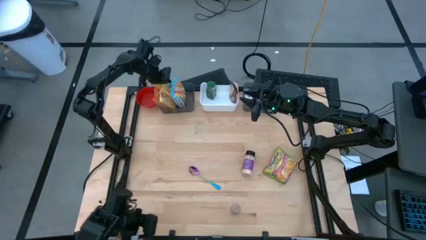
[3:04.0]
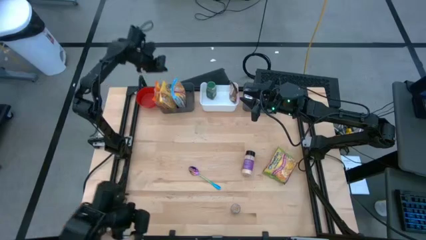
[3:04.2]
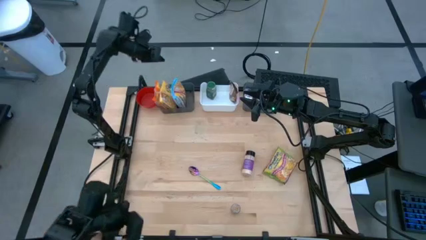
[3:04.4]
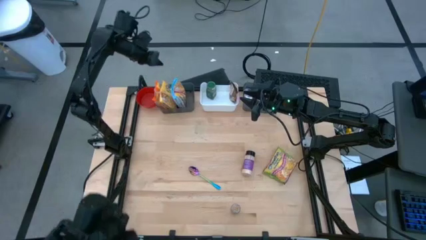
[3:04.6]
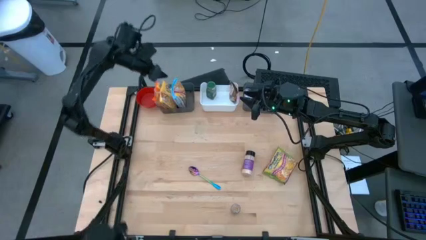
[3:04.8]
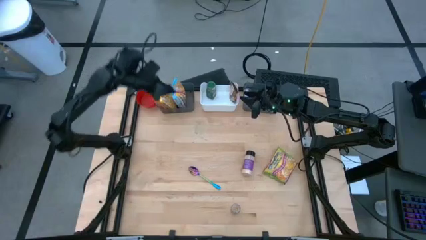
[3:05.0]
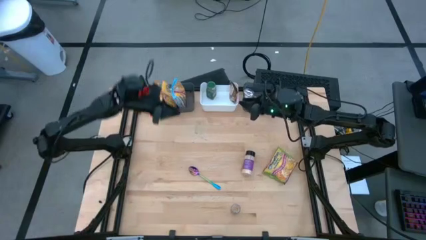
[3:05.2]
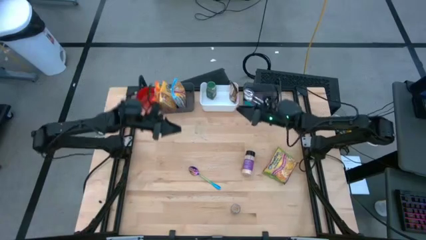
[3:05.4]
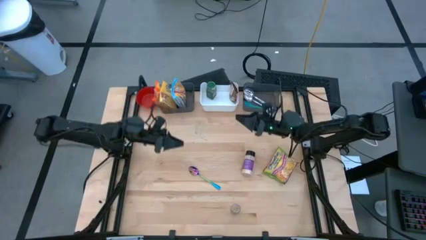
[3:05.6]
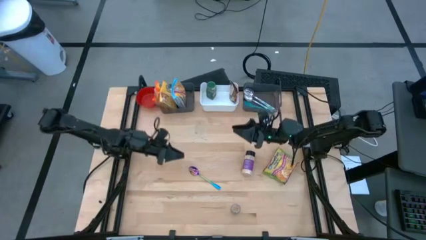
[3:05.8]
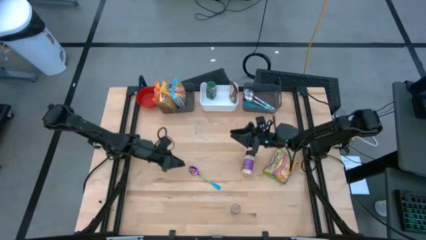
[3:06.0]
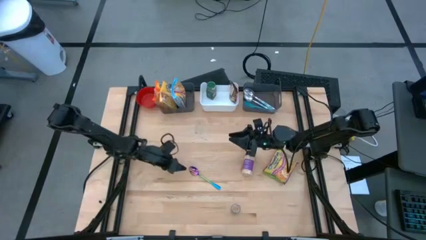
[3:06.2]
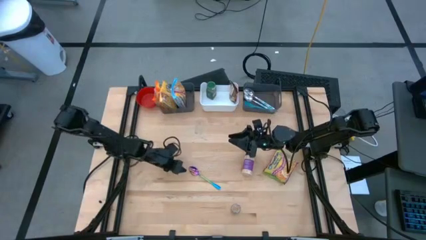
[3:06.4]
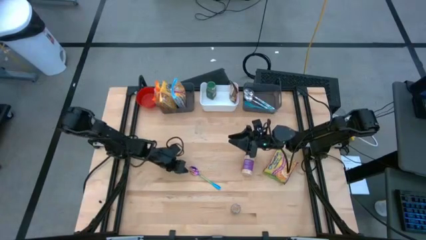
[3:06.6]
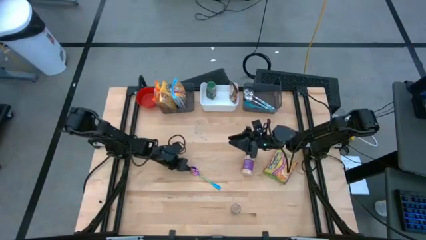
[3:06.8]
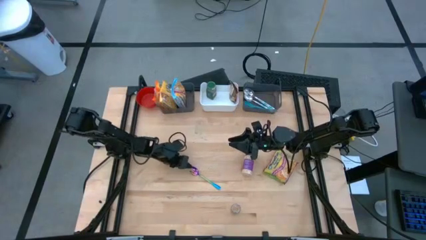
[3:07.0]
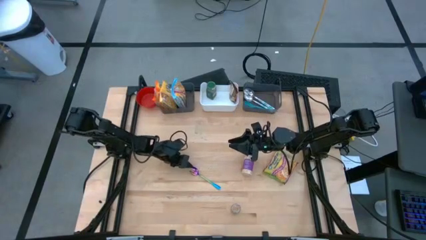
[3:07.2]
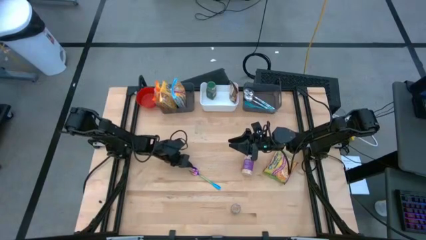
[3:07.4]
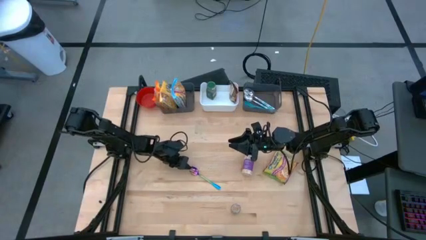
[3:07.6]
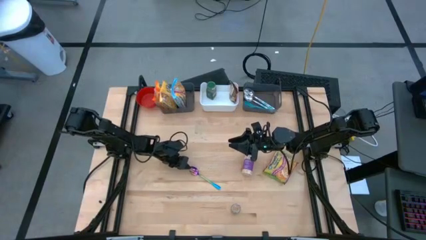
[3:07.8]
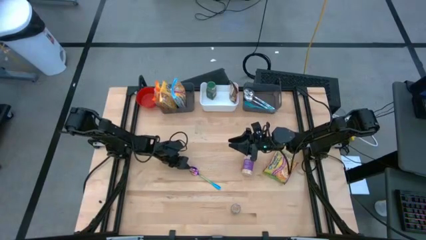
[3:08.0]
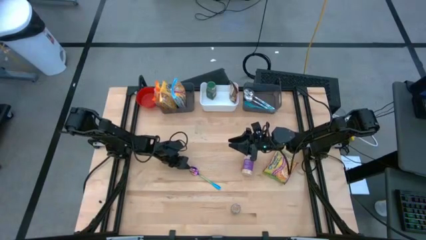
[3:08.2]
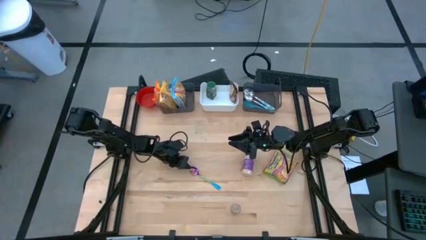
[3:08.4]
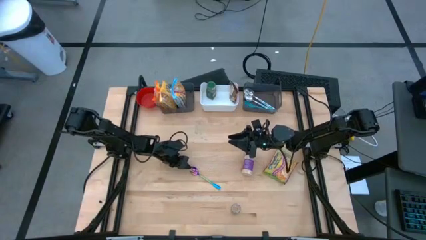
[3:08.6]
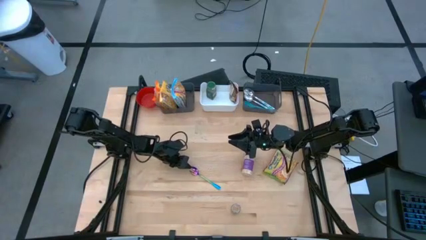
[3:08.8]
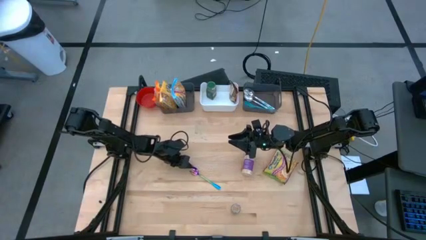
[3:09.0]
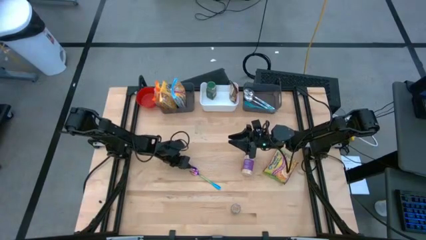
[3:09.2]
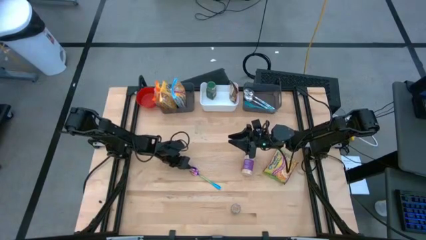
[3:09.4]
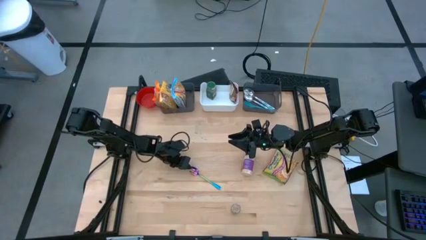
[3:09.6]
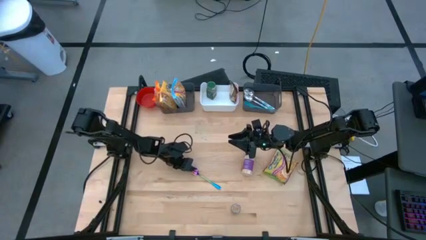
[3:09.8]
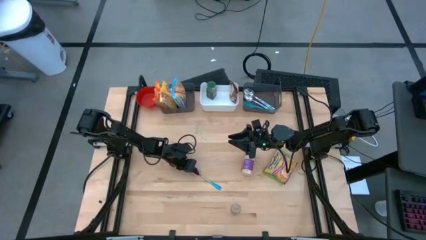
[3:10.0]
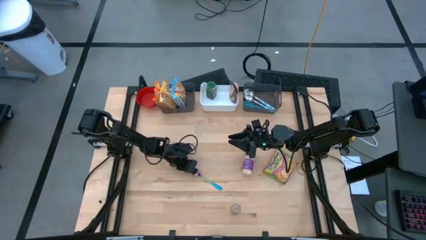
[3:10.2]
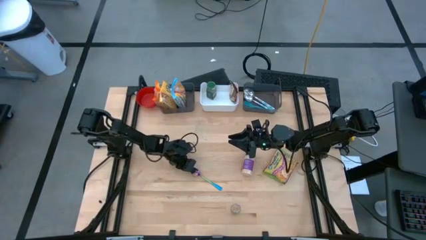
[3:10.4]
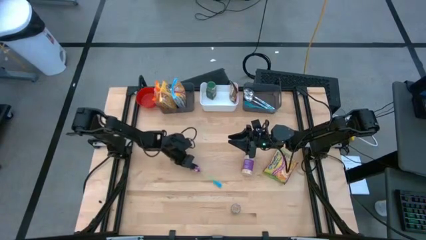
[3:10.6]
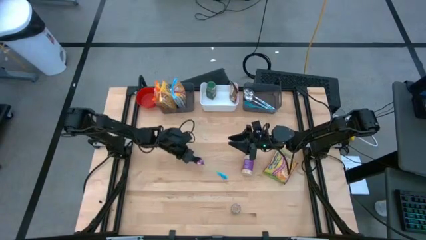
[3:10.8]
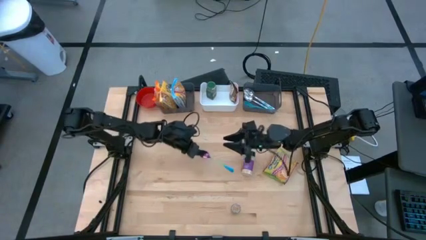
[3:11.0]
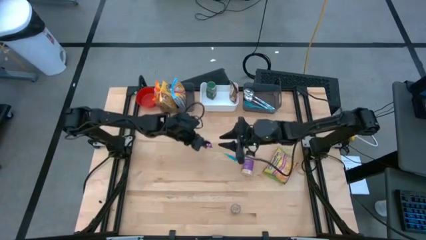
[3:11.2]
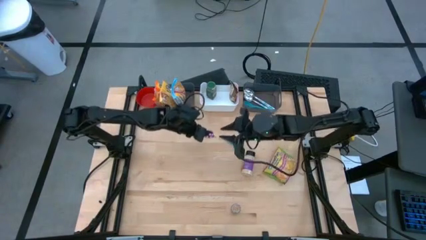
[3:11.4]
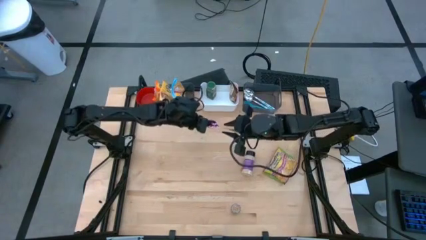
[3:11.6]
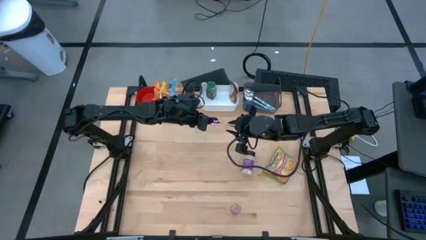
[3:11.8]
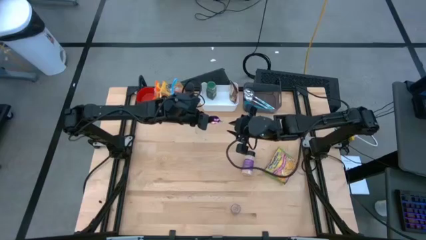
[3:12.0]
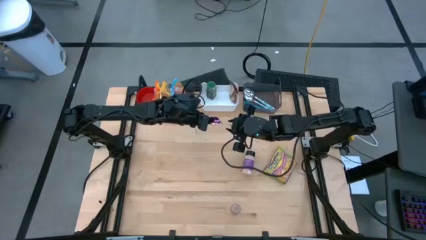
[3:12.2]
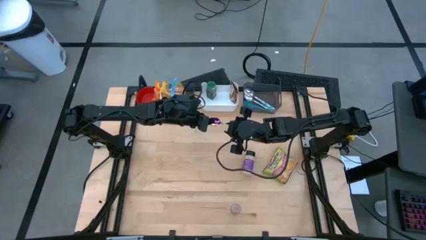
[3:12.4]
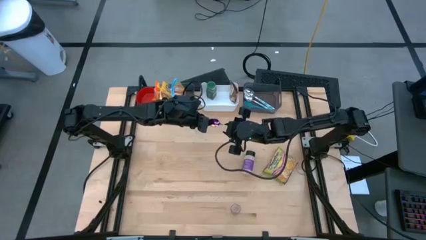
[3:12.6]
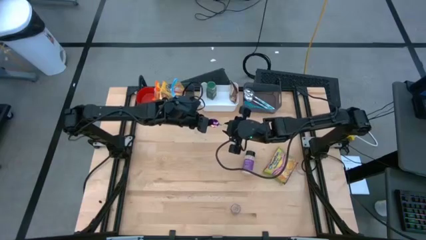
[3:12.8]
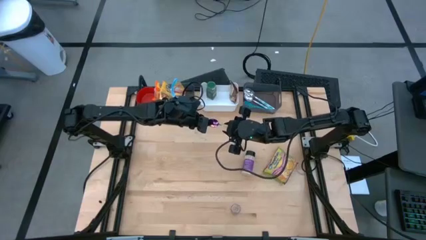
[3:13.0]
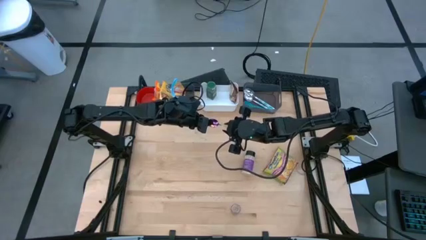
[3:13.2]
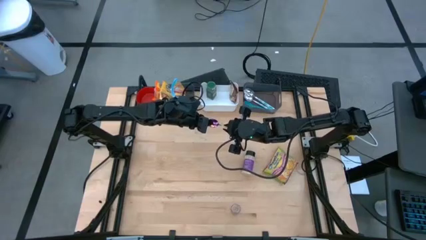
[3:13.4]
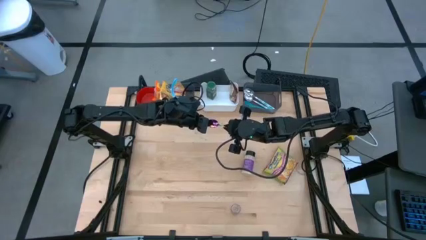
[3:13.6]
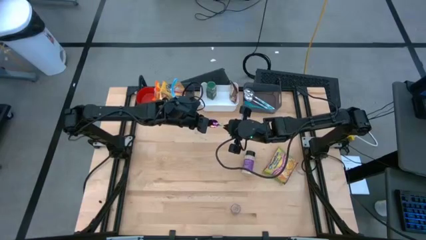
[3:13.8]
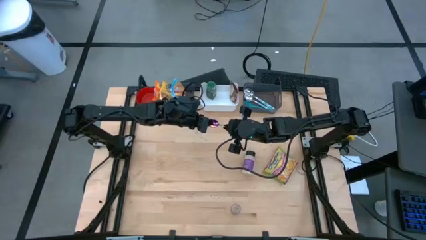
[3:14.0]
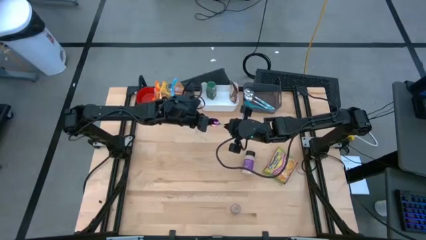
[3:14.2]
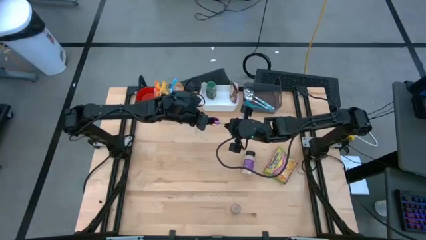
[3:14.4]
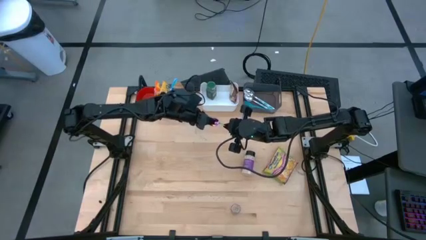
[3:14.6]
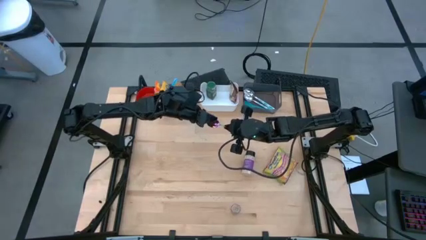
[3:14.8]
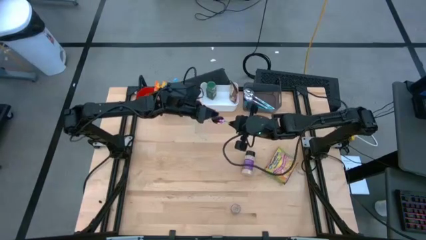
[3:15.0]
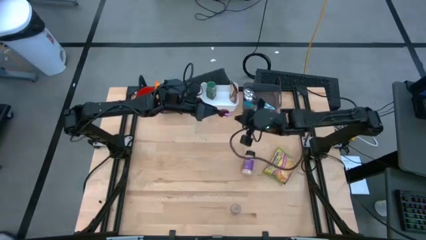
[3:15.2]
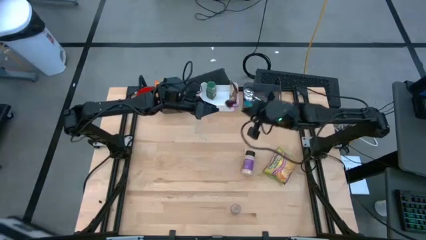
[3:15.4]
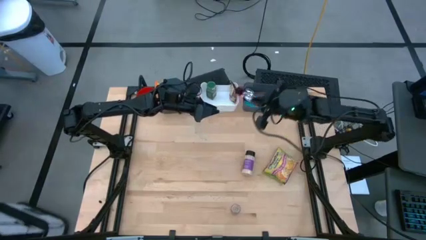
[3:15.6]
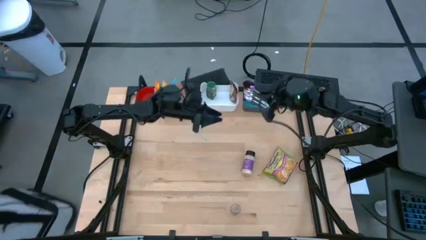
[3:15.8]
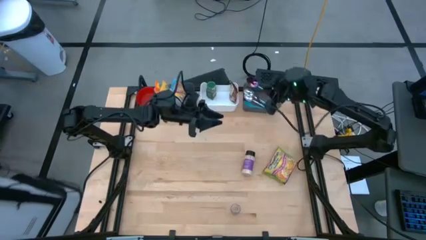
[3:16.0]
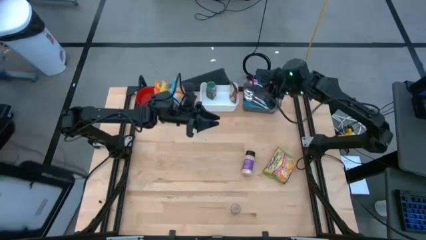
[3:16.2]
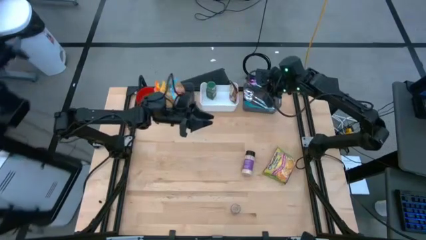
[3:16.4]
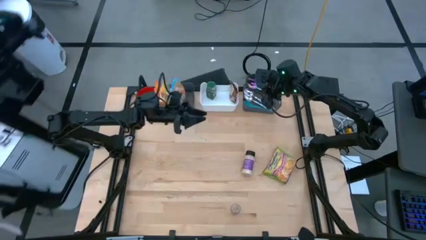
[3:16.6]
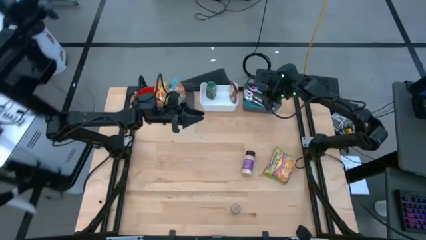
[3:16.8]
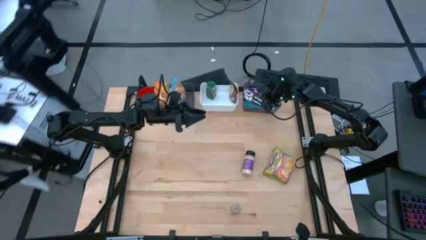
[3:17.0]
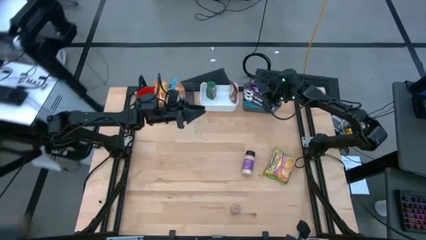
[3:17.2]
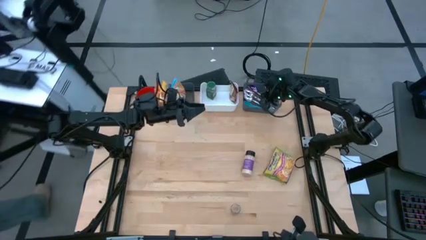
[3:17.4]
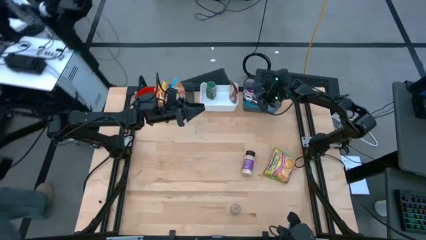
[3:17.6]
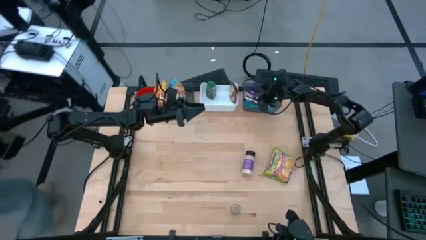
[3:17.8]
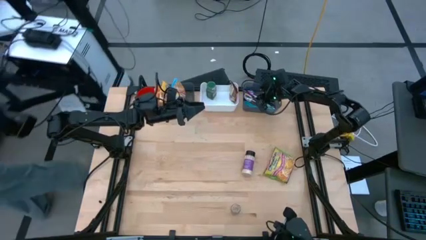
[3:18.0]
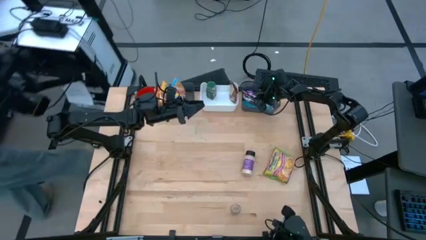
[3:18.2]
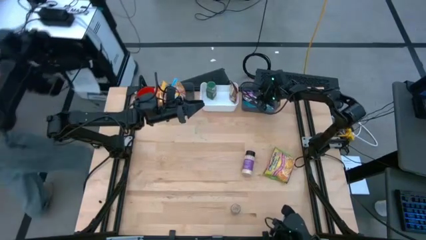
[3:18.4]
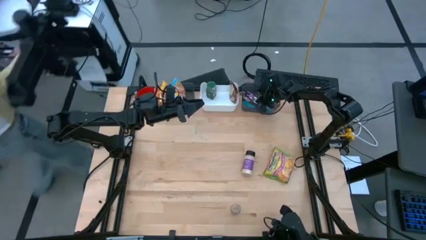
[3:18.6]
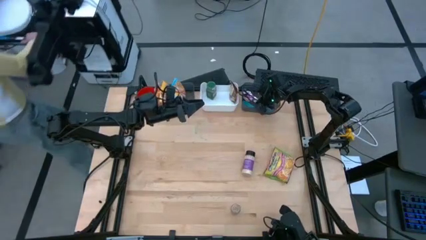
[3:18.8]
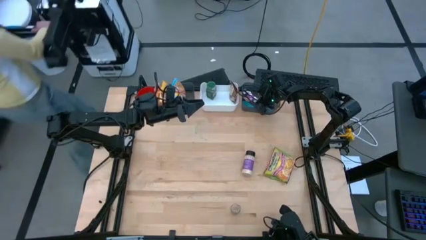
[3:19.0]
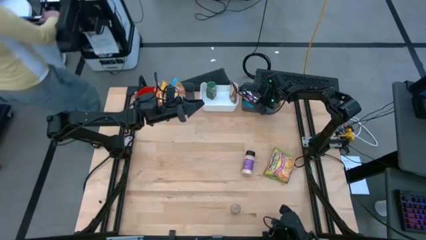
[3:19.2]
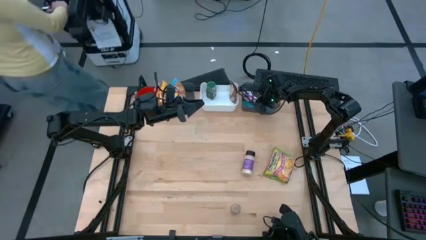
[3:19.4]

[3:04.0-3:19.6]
Task: Pick & Place Food Item
Put the purple spoon into the right black bin
